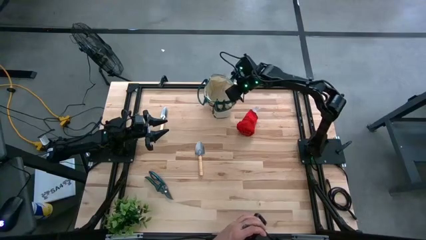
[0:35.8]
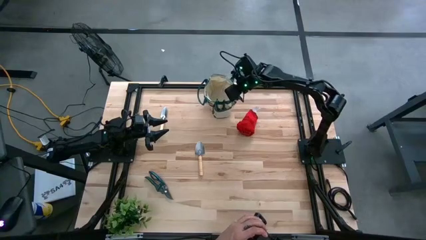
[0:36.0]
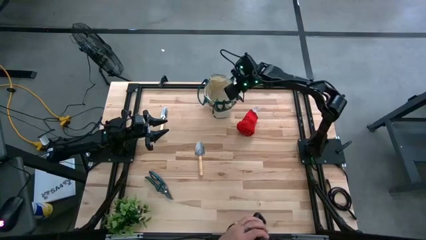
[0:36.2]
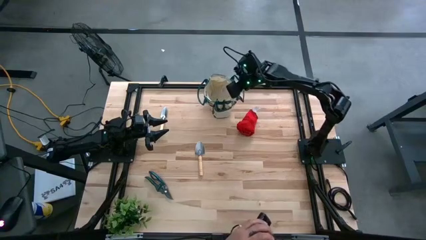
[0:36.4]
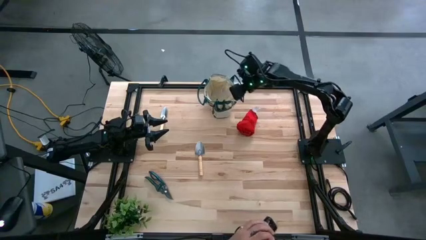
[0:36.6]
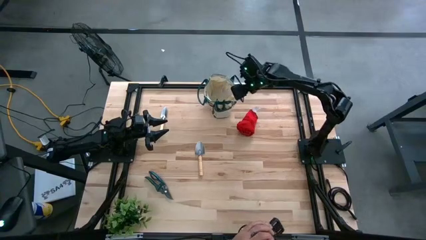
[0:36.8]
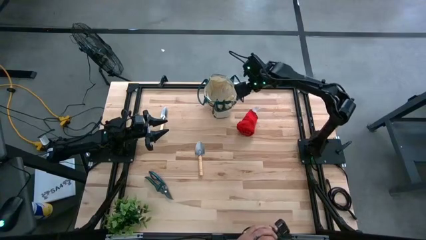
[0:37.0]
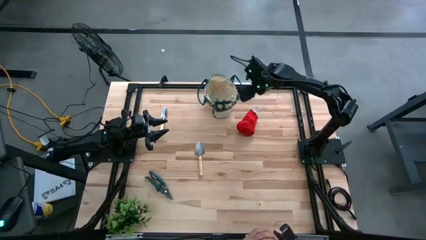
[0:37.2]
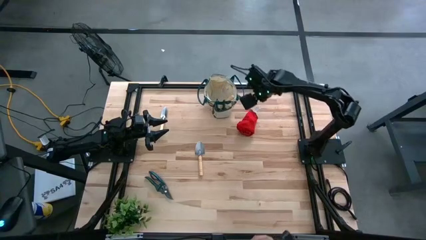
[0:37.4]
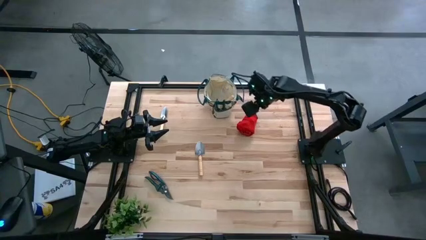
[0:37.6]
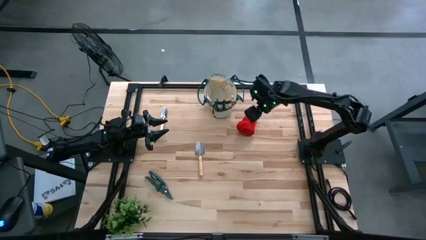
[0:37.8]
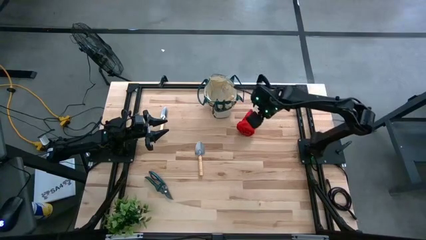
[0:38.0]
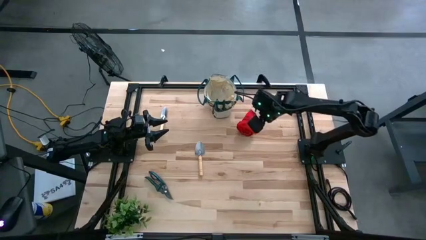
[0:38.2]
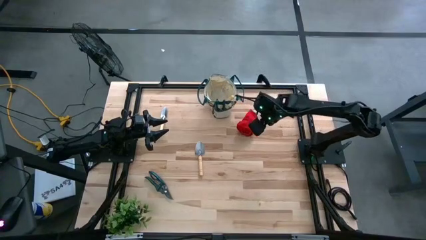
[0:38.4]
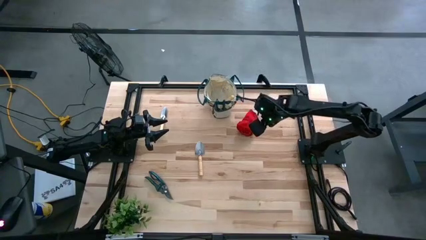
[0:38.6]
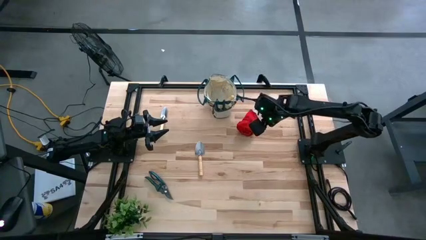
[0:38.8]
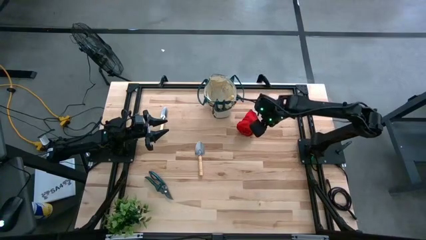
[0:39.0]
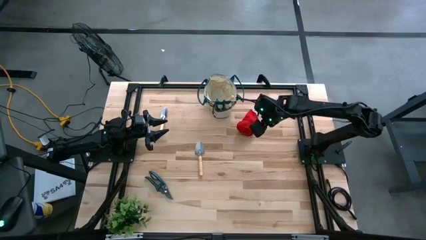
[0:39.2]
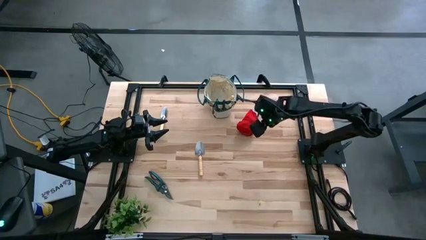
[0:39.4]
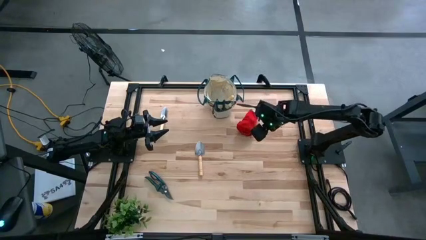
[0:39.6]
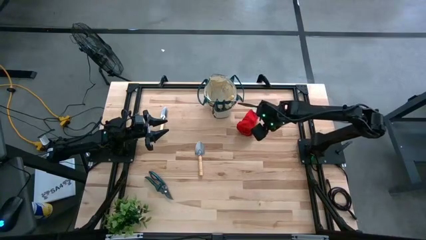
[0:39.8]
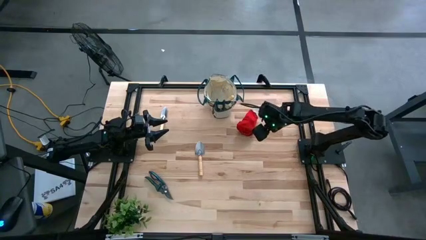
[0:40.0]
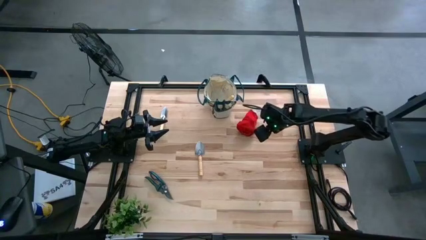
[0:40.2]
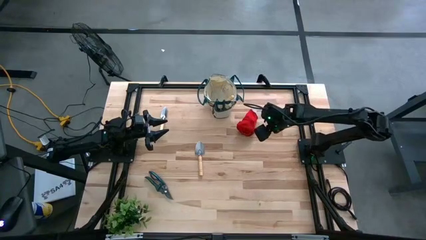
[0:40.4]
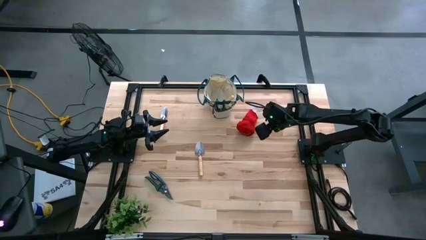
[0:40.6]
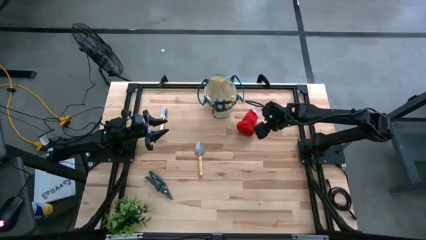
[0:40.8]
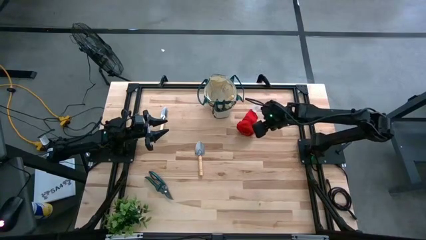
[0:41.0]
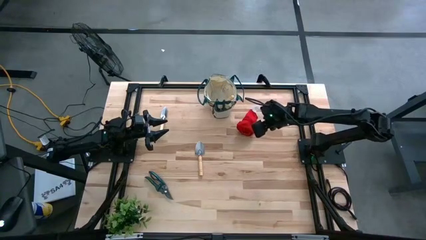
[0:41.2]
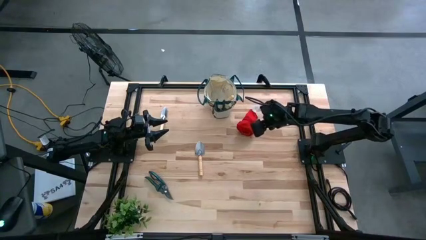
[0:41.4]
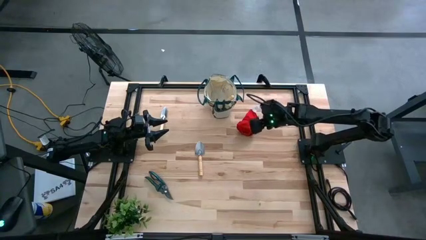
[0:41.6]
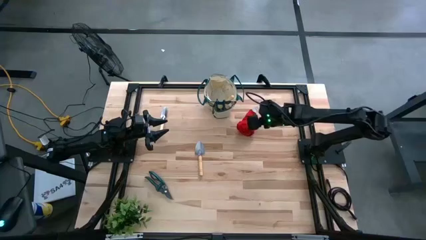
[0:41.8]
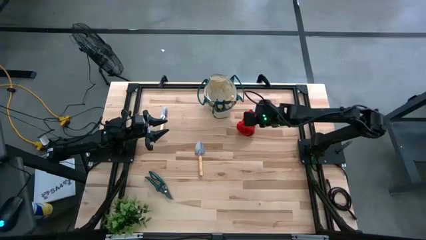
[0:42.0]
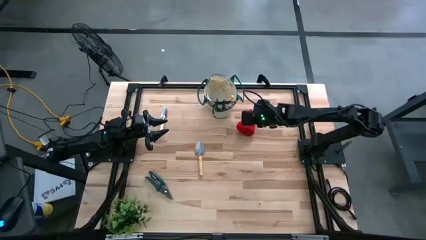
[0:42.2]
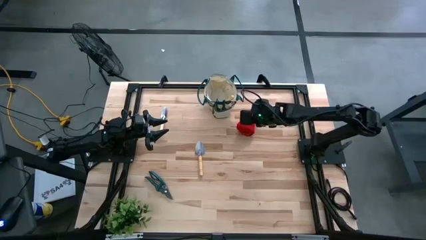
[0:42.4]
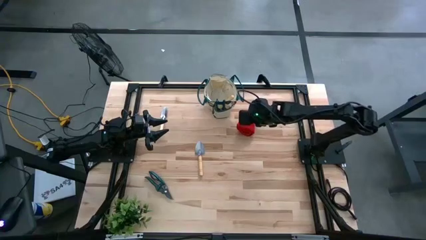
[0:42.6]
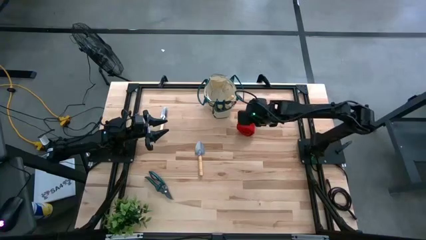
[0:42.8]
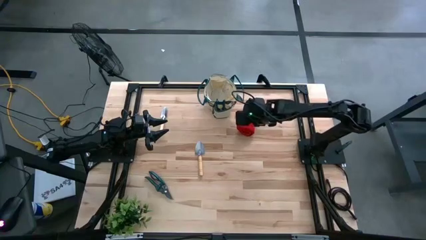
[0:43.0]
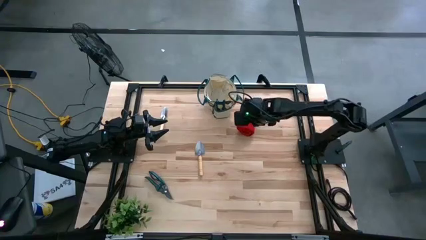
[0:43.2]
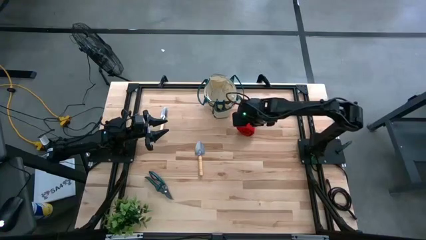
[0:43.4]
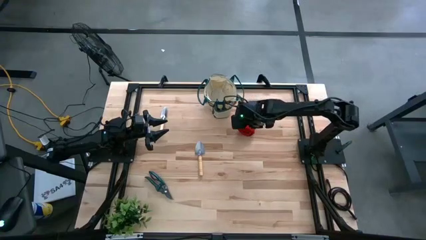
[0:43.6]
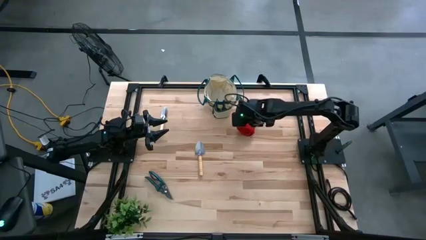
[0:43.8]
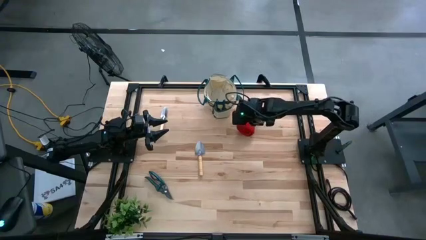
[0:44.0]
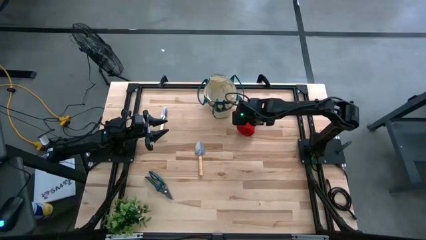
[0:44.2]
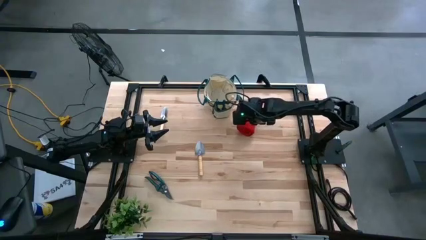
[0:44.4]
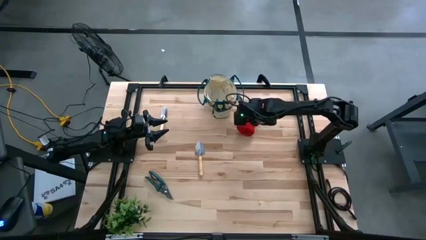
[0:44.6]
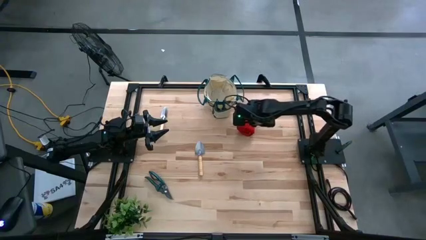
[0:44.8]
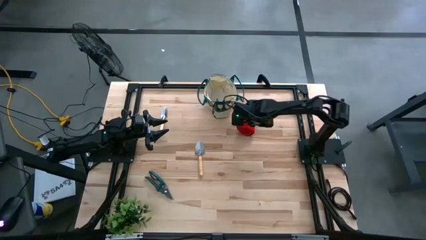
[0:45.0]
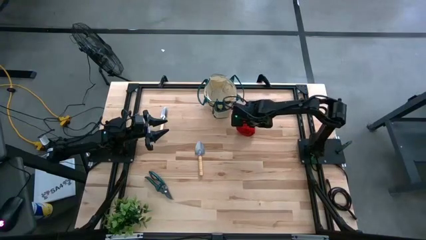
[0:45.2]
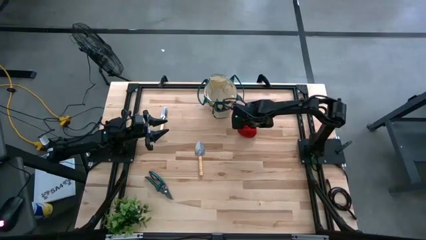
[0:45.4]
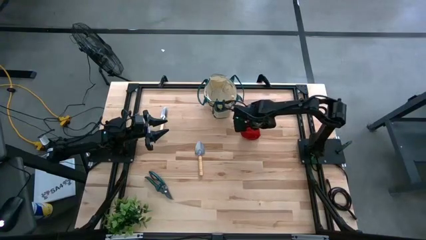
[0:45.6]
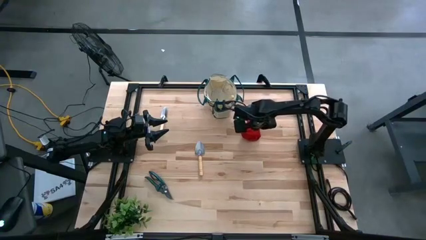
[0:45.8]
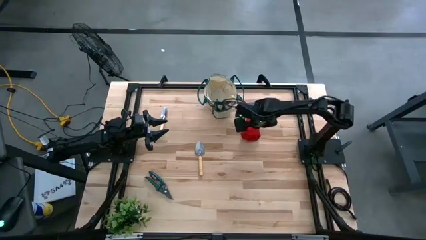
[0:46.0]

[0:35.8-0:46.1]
Task: Pick & Place Garden tools in Gardening bag
Adjust the red gloves

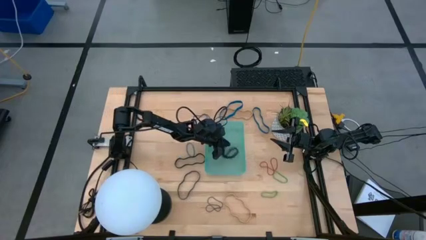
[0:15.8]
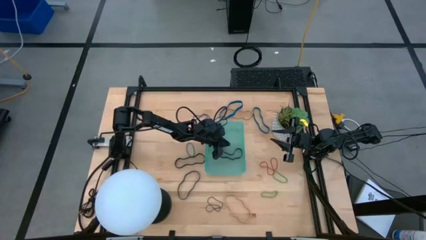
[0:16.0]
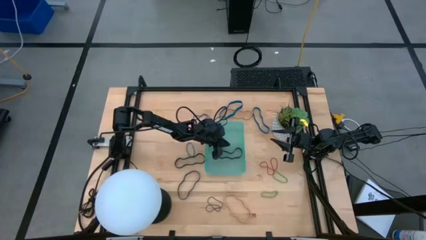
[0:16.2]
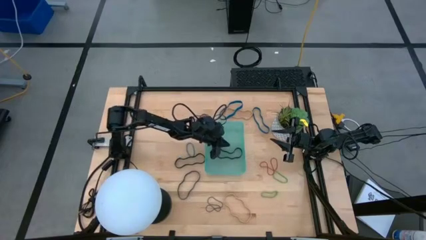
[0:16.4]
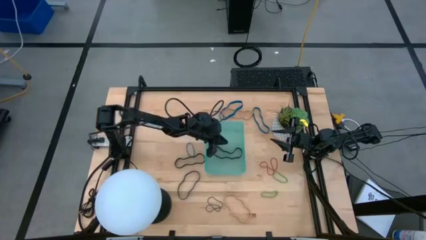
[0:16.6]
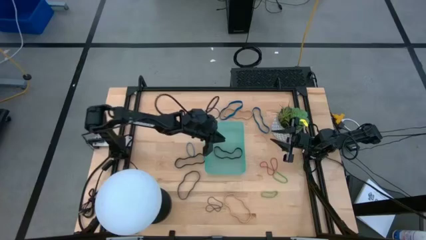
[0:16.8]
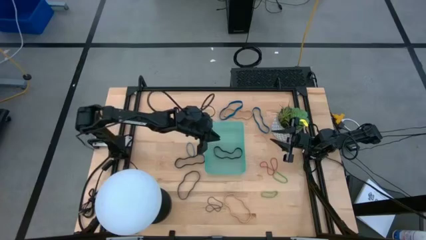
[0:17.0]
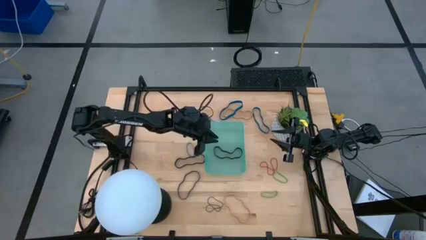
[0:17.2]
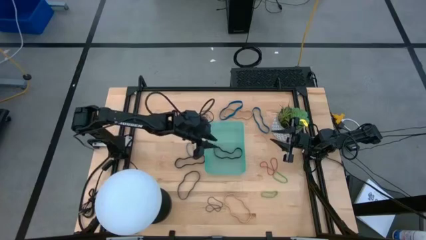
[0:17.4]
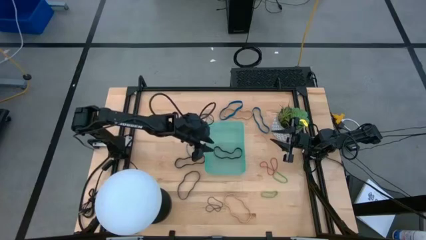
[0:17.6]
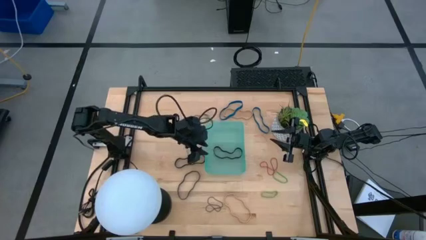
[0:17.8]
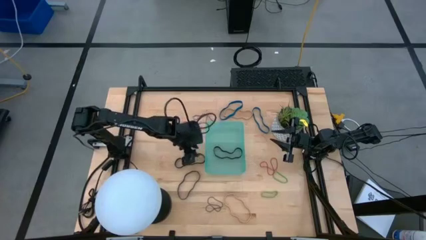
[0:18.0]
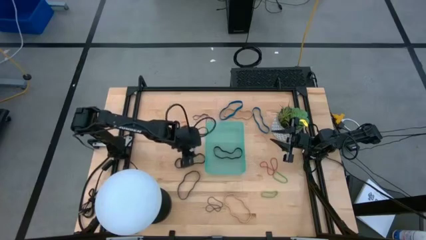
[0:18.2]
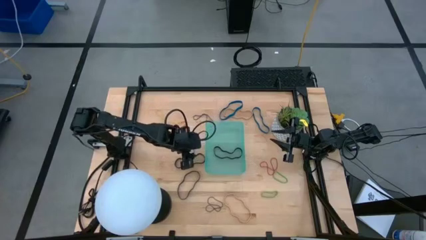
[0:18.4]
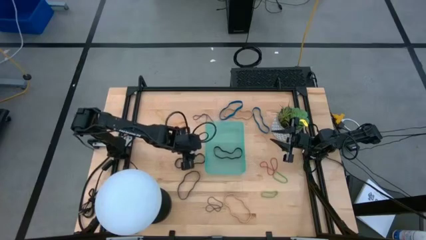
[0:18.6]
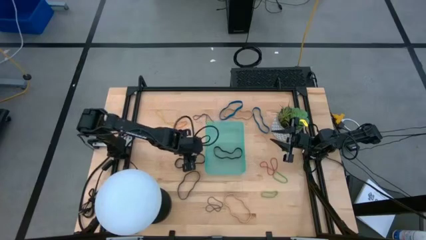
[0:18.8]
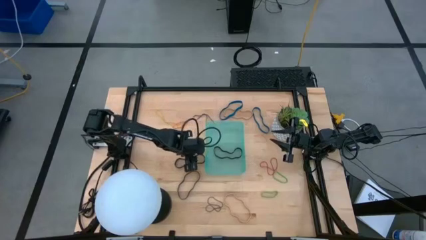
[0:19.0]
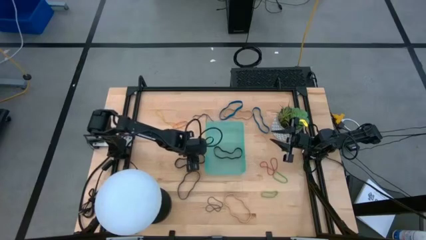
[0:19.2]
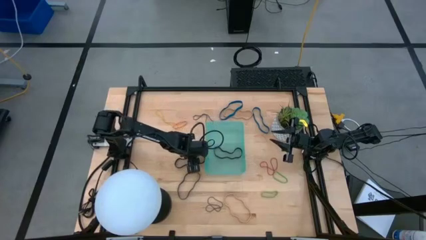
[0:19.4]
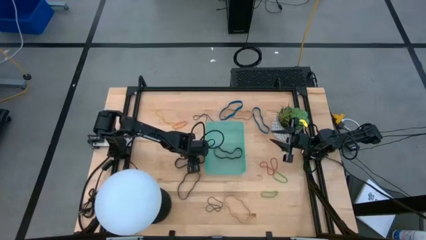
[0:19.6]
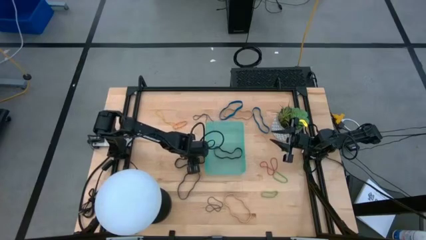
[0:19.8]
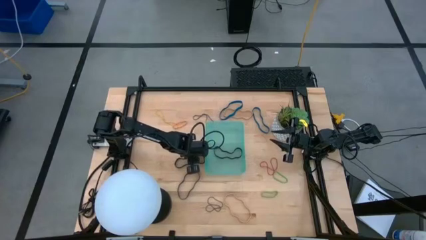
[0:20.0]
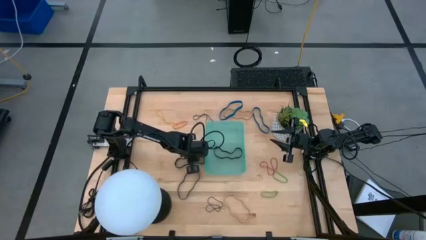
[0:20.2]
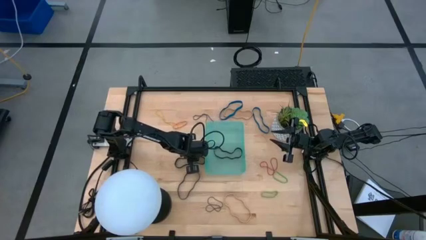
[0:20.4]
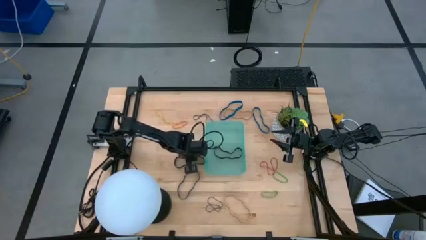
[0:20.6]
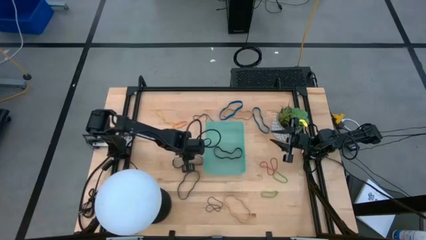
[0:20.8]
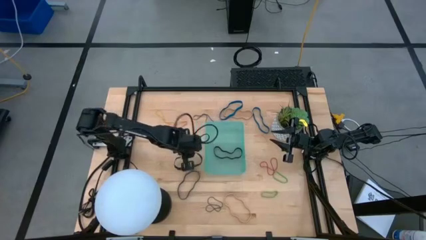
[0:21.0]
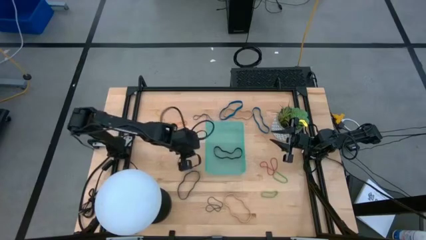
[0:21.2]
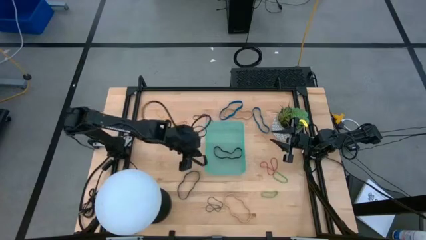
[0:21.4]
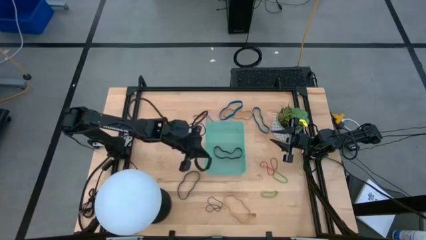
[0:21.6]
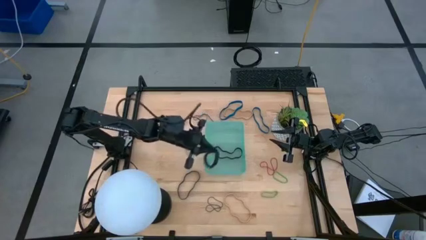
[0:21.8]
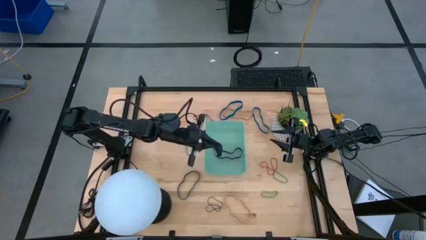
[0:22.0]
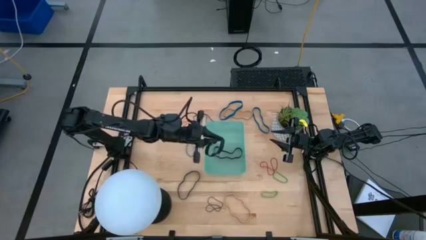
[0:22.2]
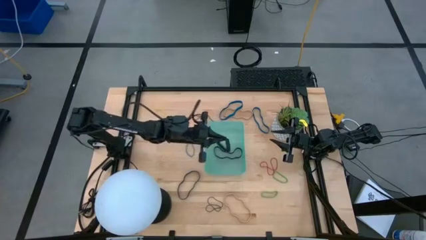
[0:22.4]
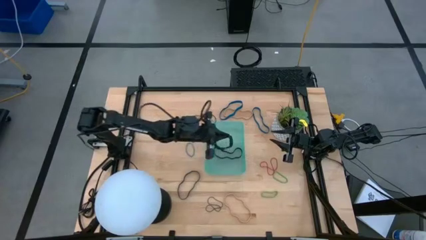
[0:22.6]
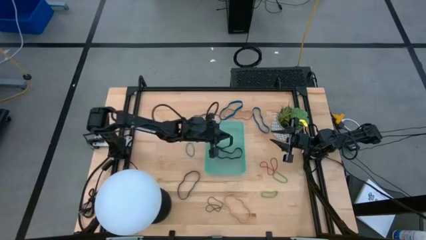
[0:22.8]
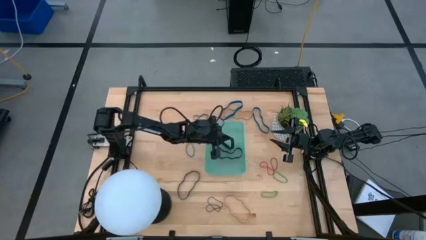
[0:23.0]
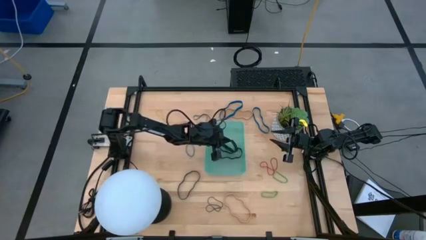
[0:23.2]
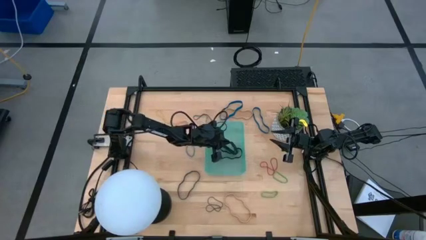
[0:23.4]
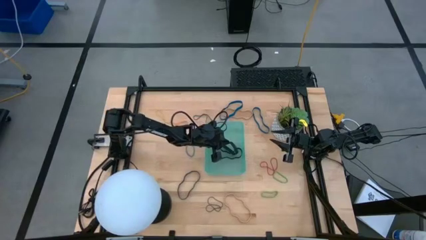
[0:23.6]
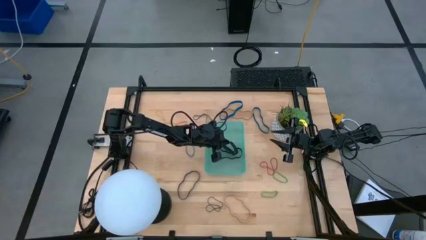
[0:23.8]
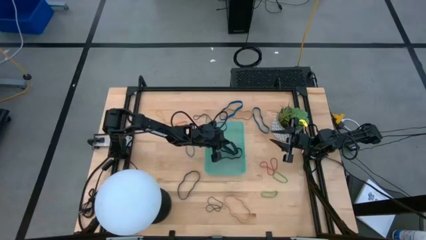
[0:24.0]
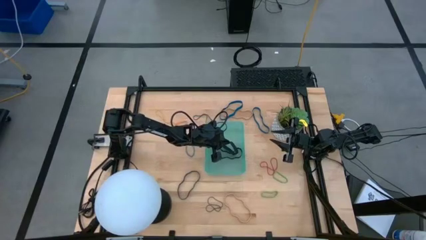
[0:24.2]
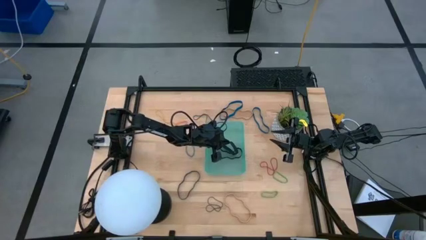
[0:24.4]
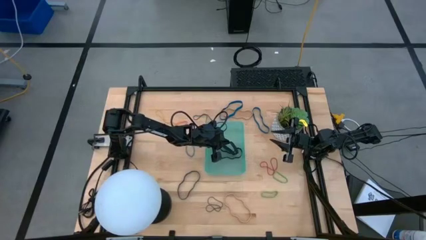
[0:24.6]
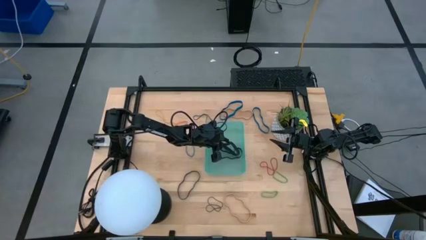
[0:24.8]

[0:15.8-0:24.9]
Task: Pick and place rubber bands into bin
Put the black rubber band into the green bin
